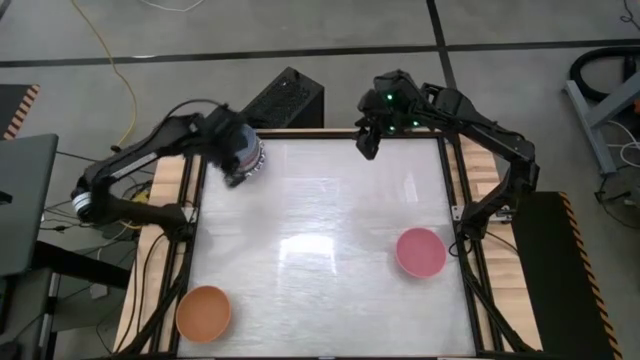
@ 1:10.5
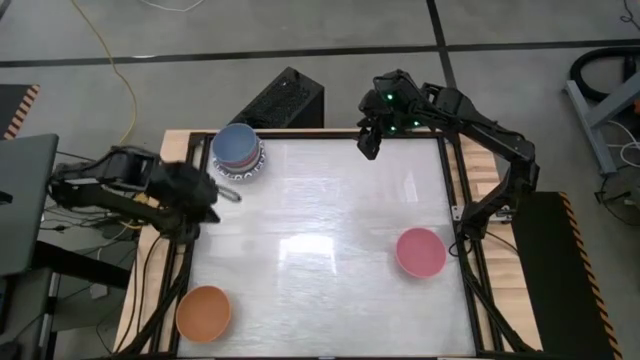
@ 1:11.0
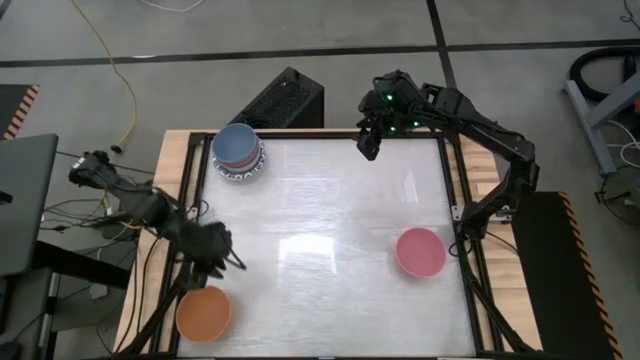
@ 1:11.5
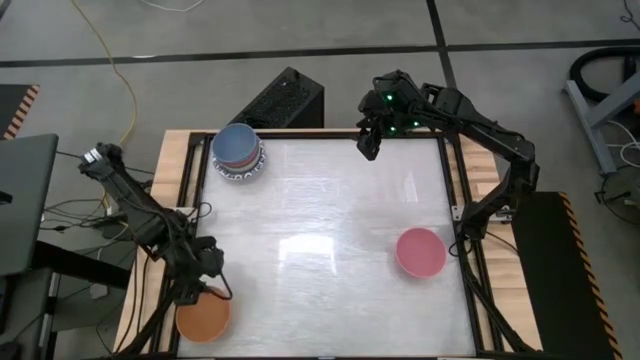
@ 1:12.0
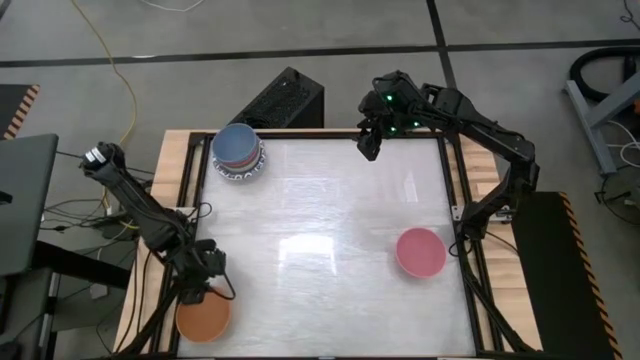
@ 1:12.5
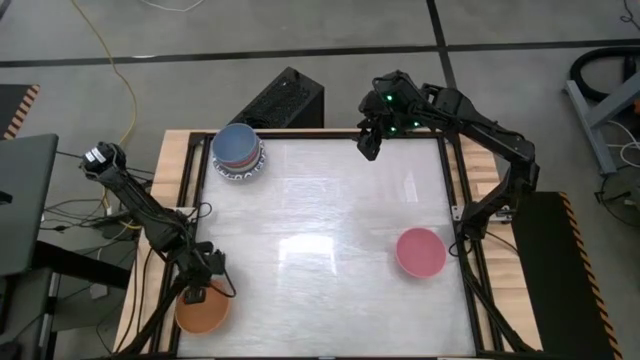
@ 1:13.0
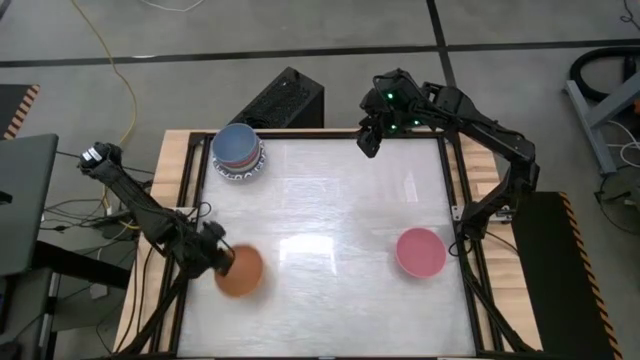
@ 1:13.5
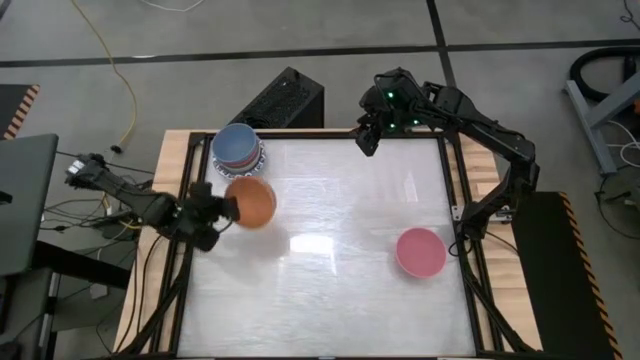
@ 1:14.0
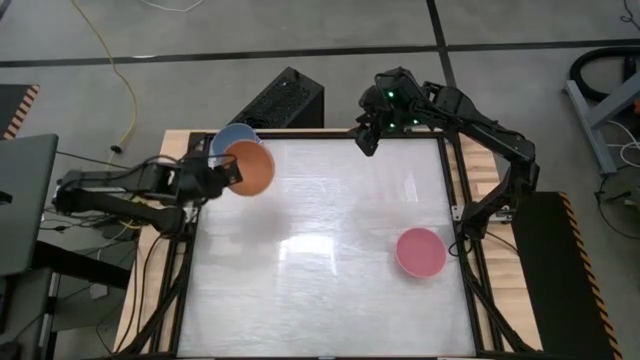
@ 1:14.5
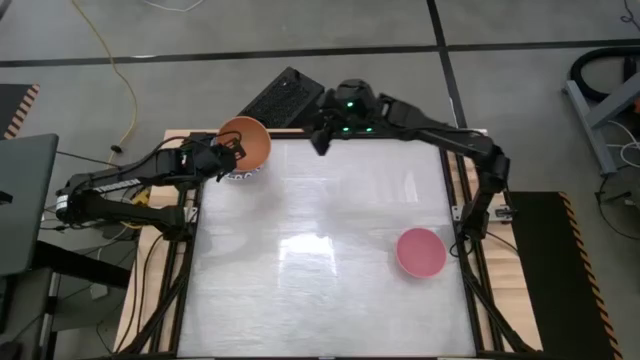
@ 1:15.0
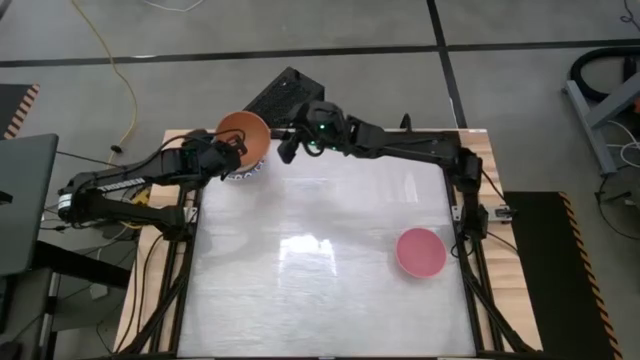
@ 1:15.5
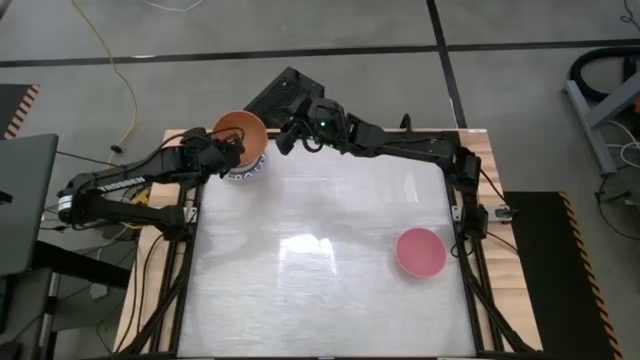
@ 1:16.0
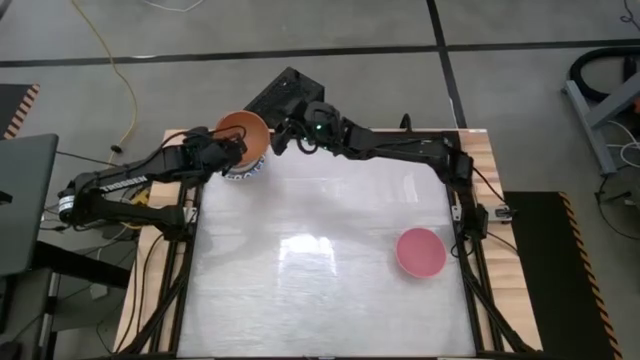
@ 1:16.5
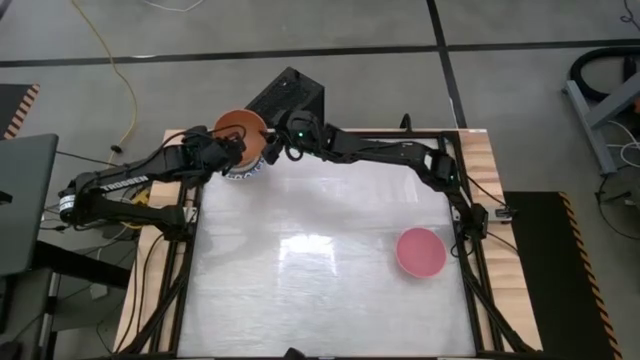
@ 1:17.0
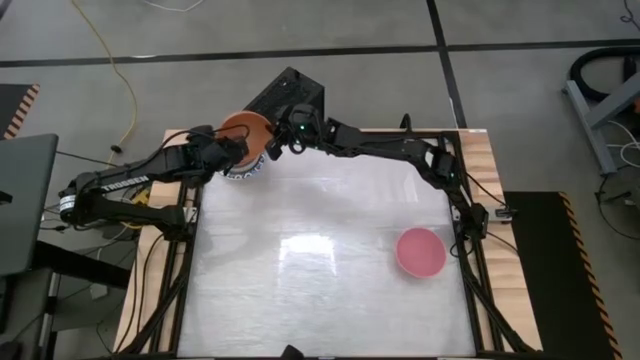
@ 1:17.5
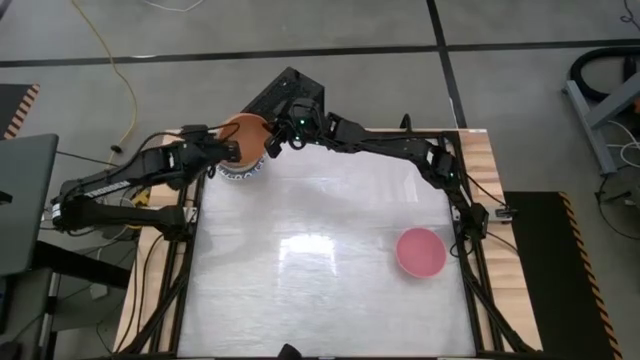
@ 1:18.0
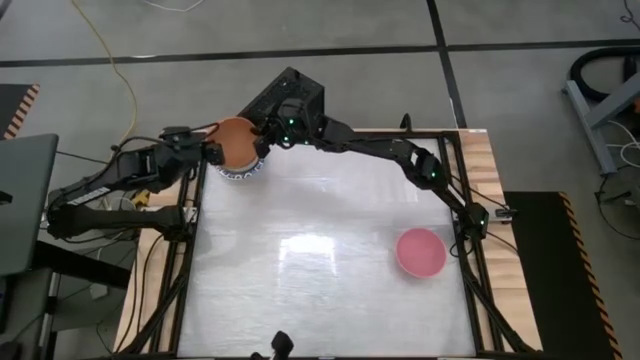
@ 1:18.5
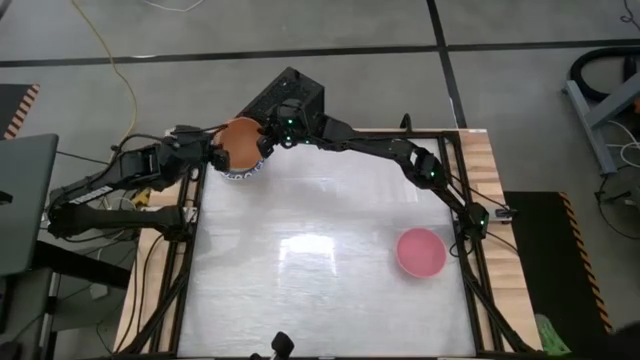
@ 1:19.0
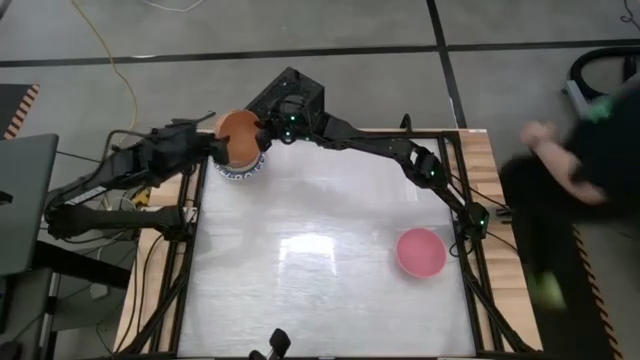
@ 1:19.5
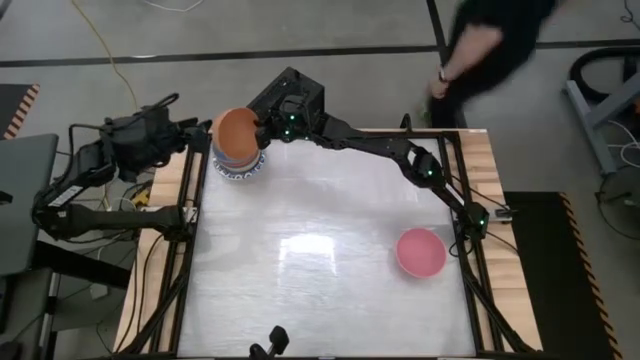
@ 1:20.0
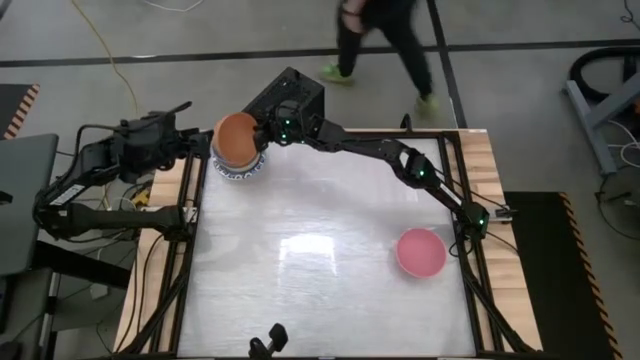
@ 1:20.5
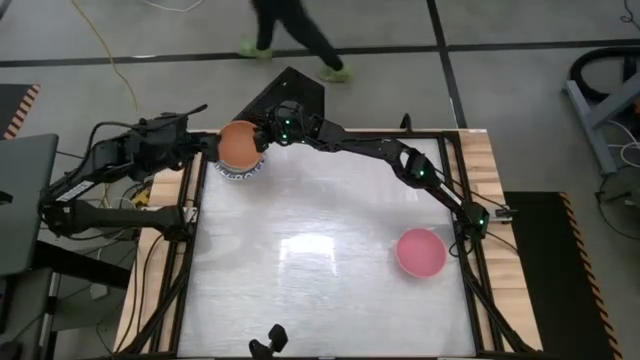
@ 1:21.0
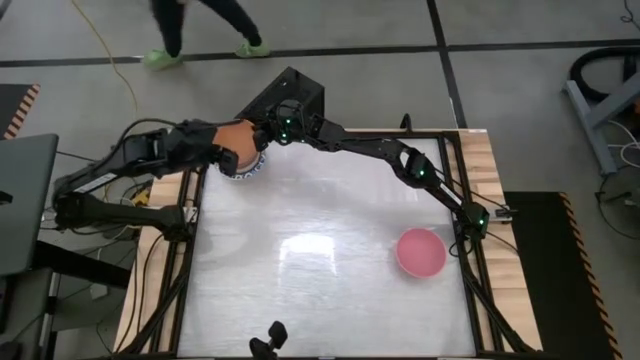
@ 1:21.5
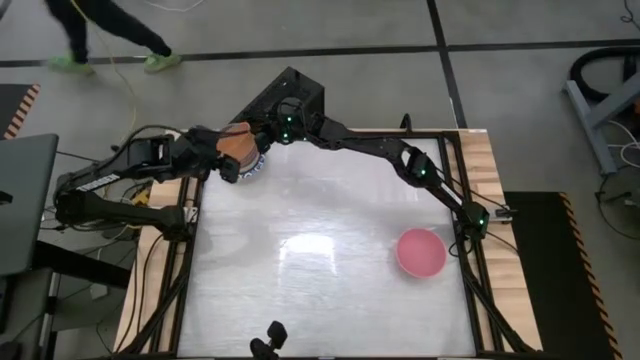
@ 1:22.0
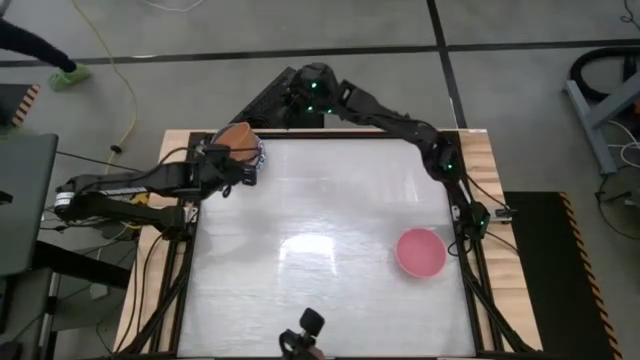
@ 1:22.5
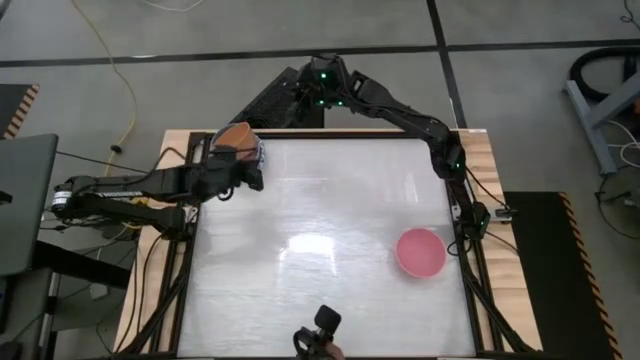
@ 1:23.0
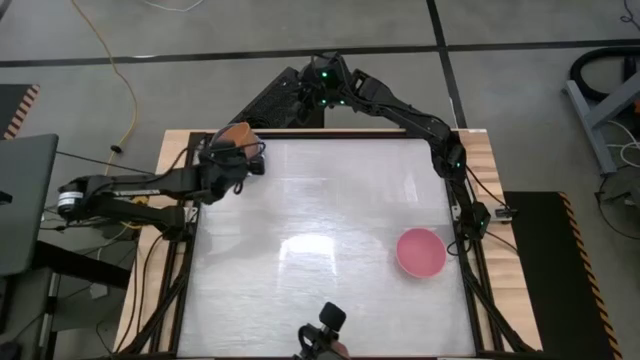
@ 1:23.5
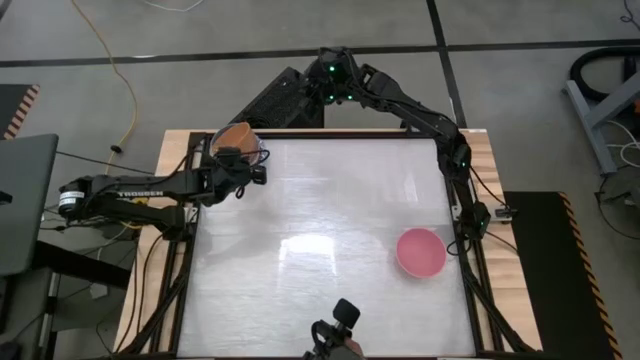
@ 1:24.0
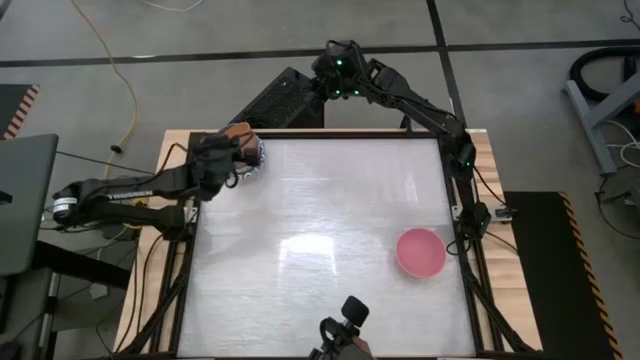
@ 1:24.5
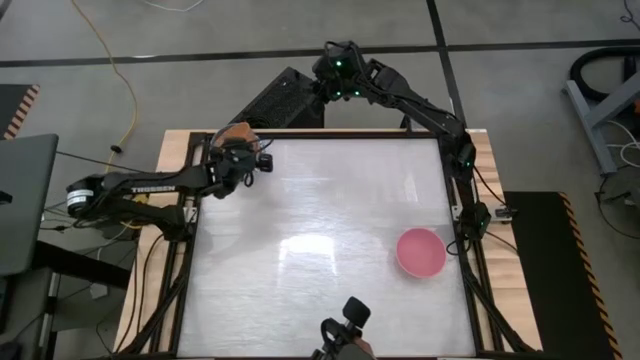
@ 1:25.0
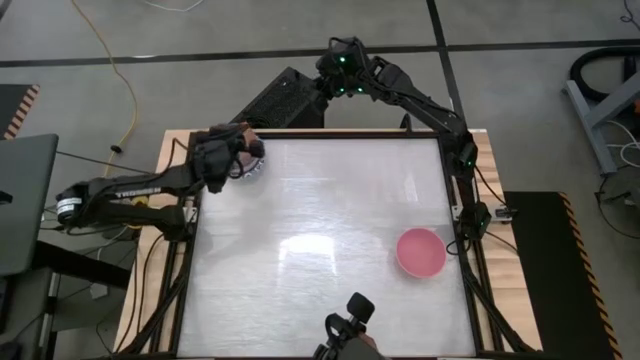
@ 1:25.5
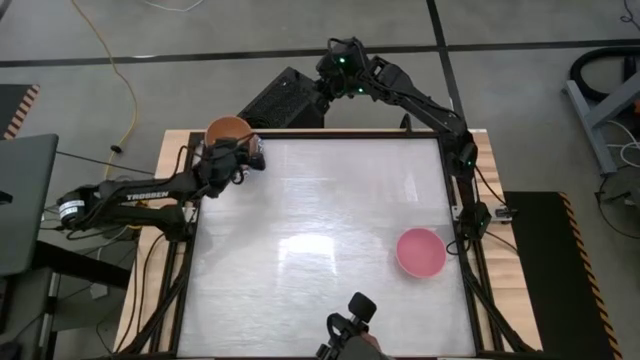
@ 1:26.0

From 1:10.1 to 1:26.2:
Stack the brown bowl on top of the blue bowl

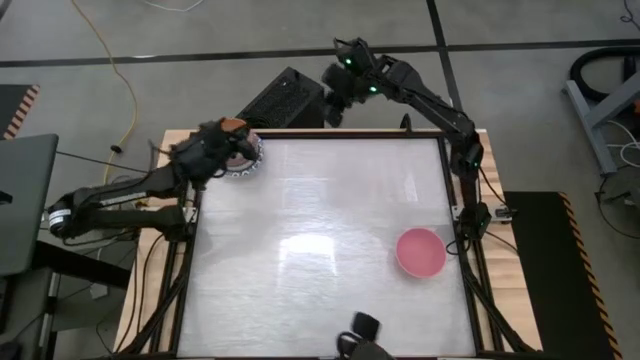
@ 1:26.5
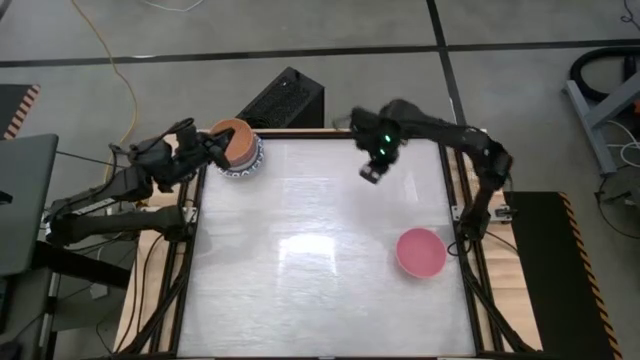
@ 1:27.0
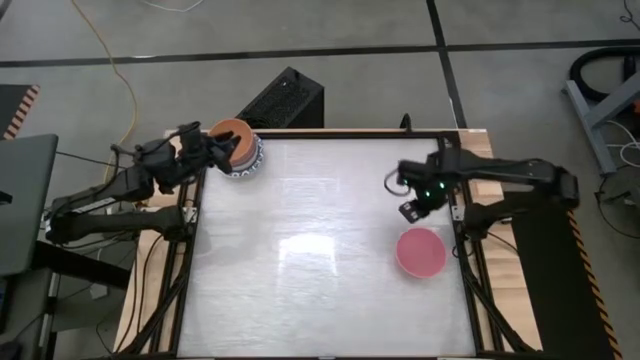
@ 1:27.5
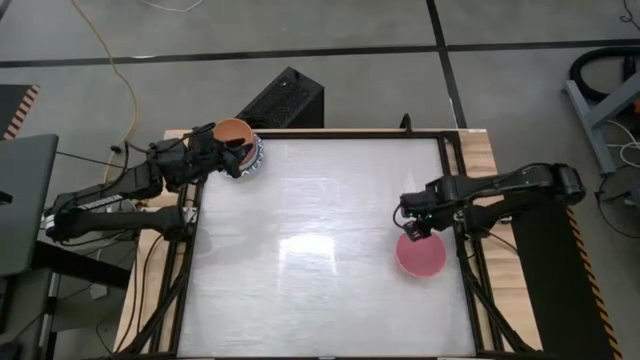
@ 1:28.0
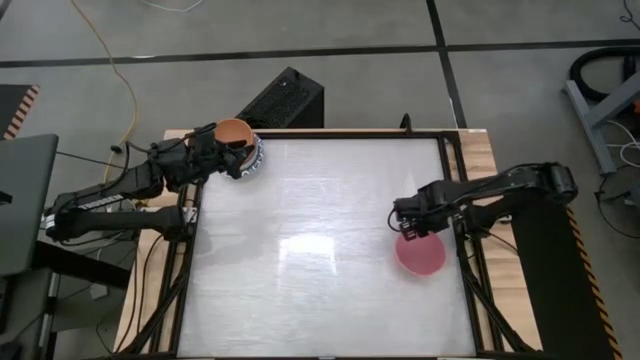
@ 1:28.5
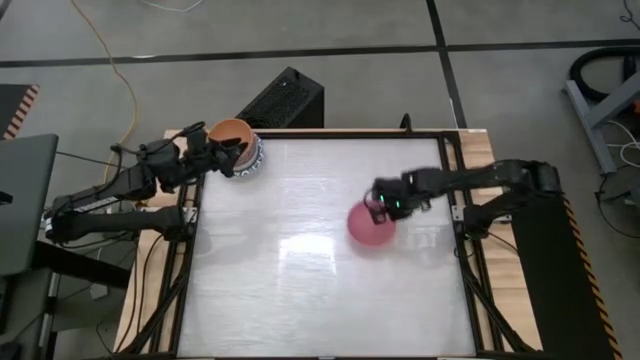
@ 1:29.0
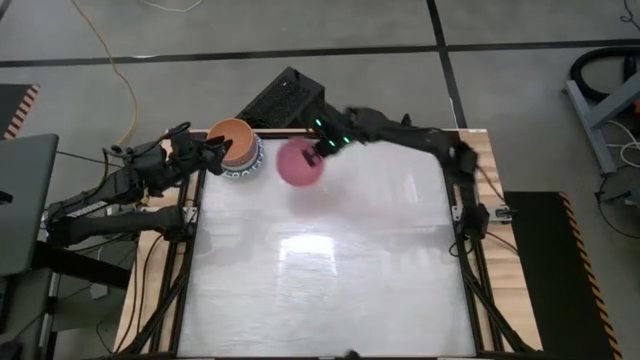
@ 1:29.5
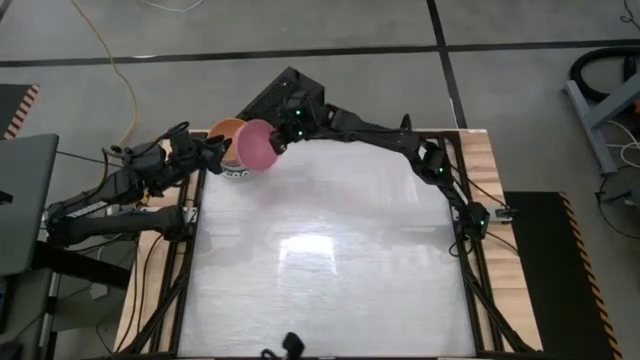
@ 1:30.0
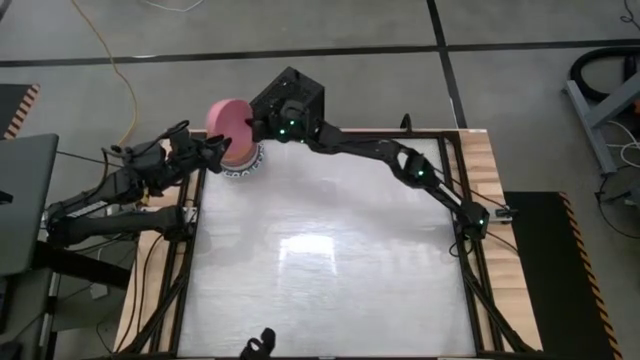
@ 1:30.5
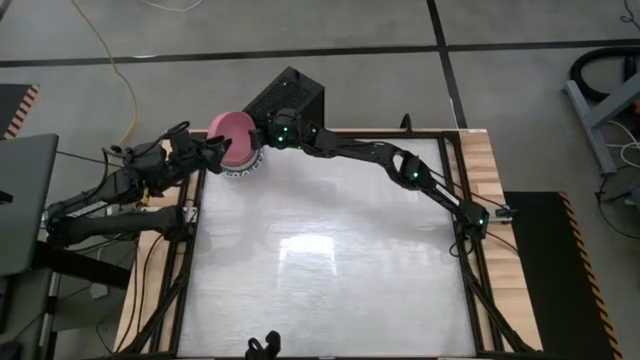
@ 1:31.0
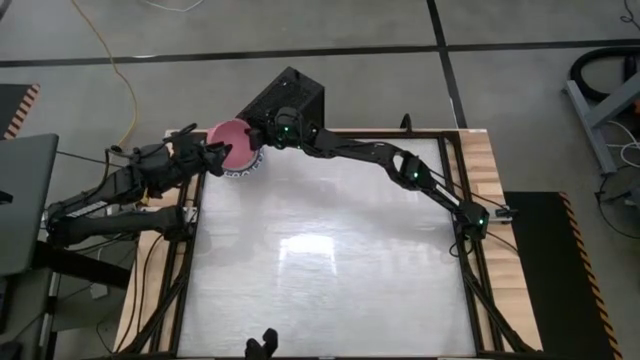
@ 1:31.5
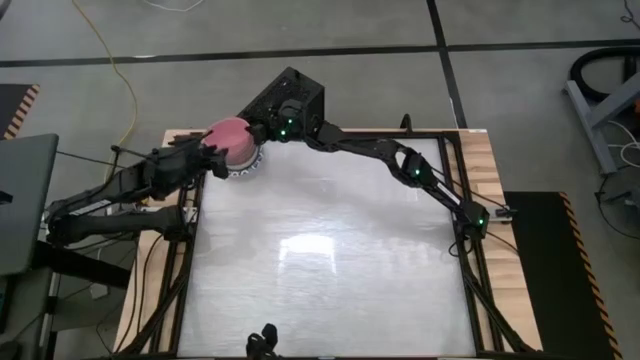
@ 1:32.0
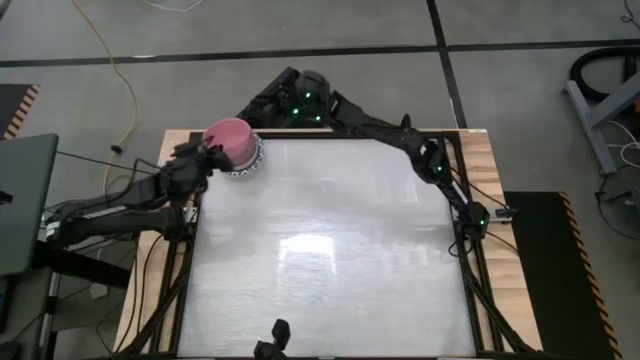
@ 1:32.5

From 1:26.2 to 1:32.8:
Stack the pink bowl on top of the brown bowl
